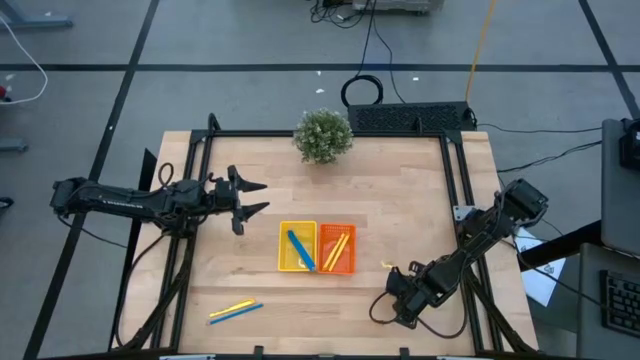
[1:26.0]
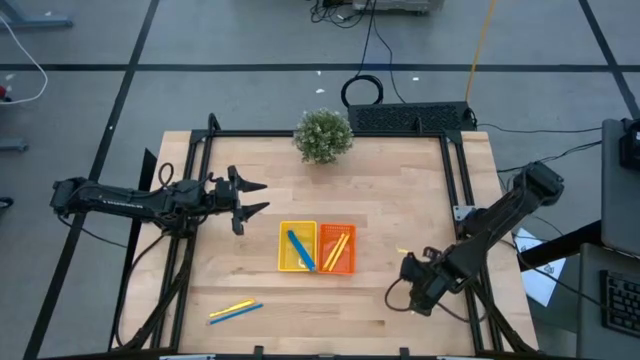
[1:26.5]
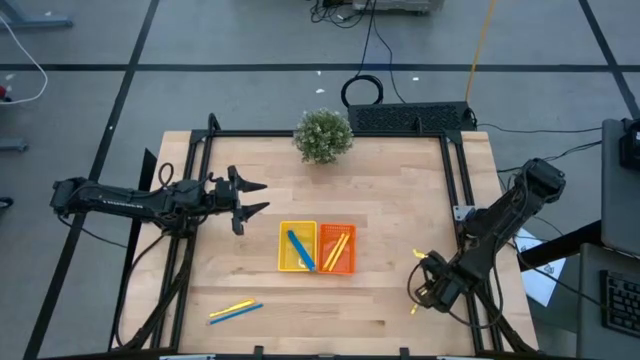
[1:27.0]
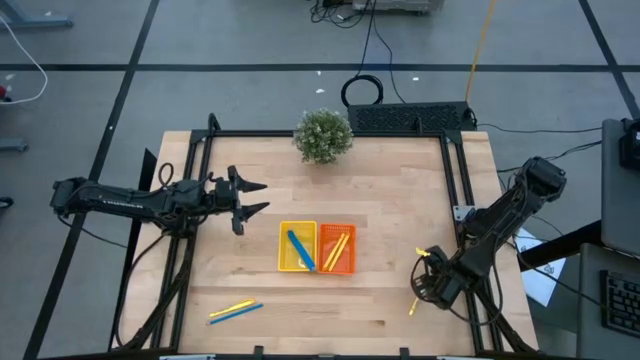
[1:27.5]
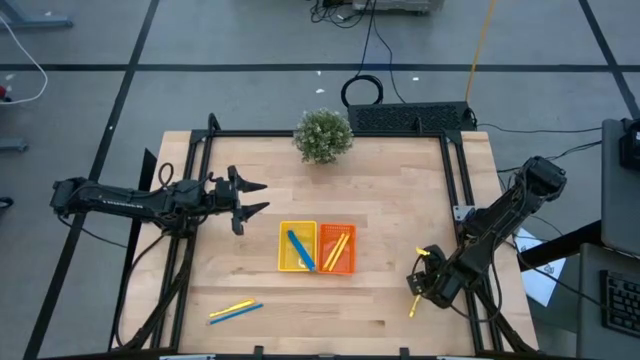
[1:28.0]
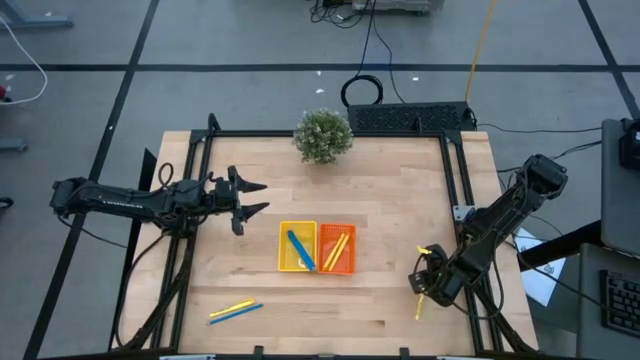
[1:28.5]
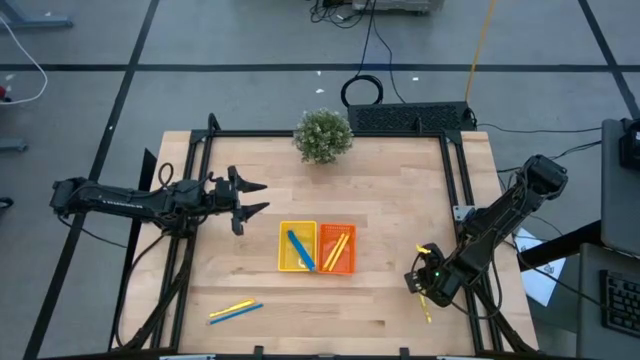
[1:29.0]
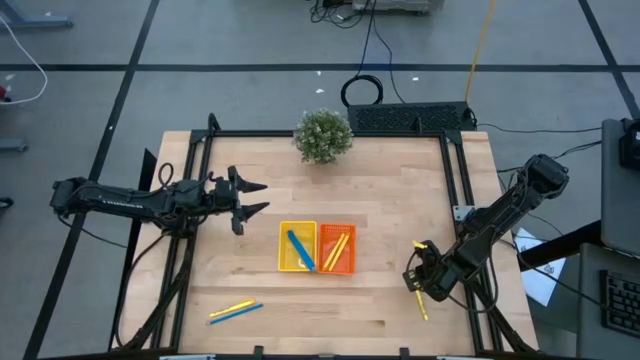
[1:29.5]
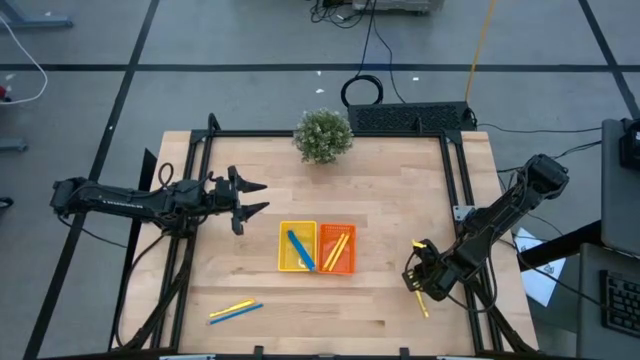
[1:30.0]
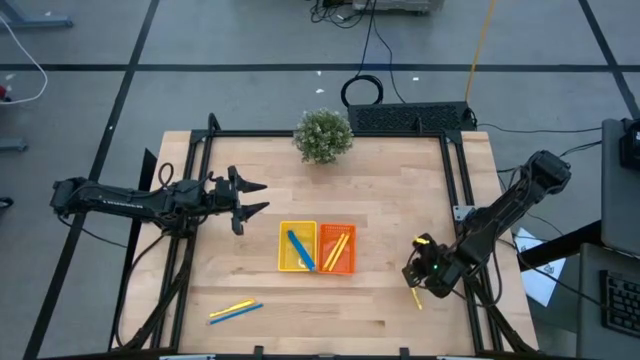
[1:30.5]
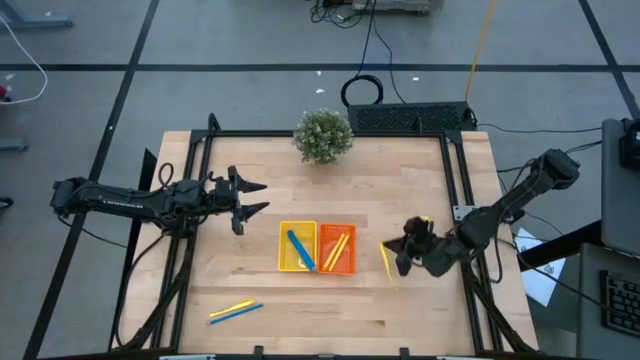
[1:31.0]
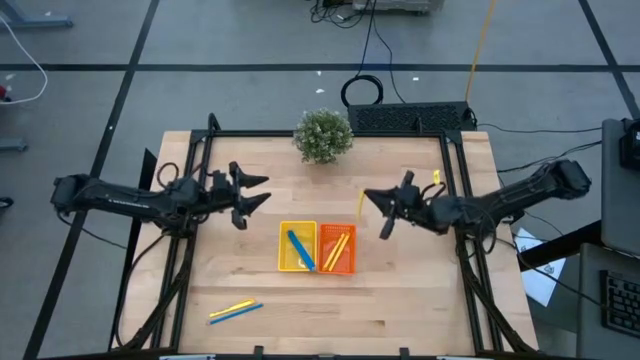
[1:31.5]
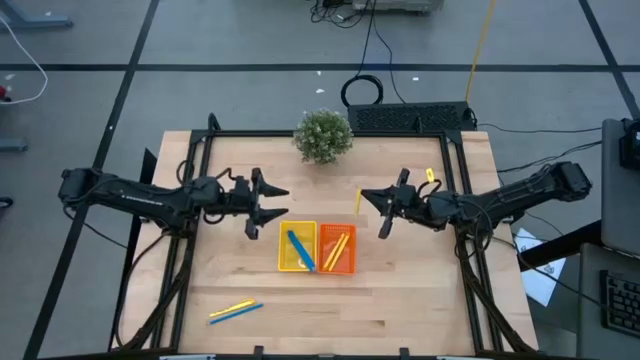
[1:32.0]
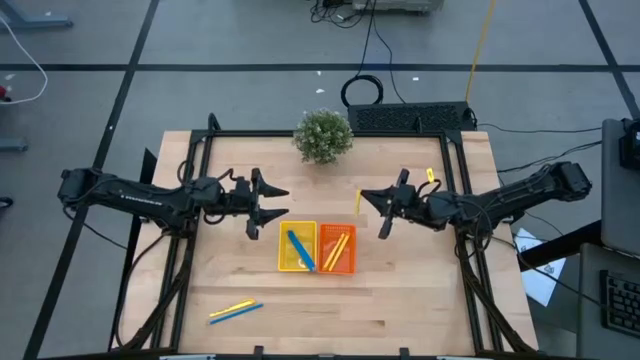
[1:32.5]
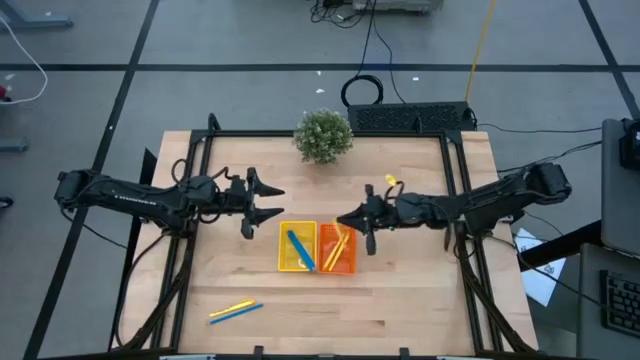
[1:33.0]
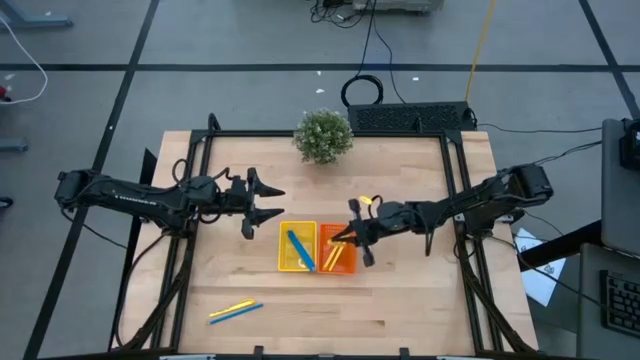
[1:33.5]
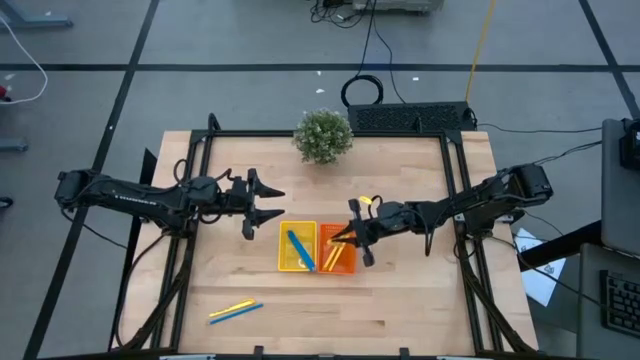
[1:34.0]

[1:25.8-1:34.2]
Task: Sort pens & pencils
Put the right yellow pen into the orange bin

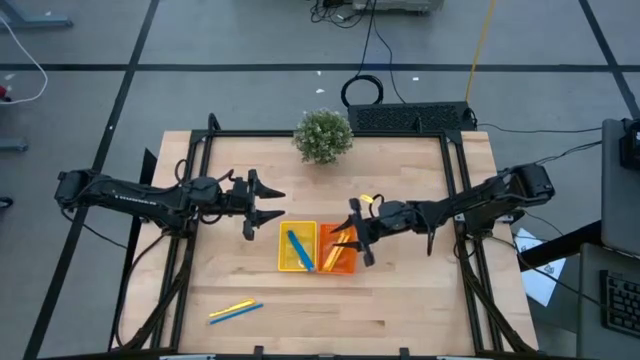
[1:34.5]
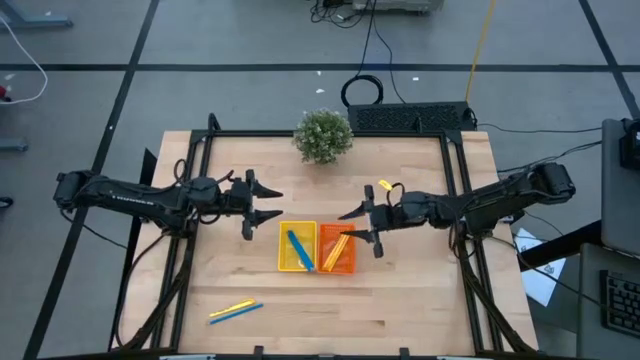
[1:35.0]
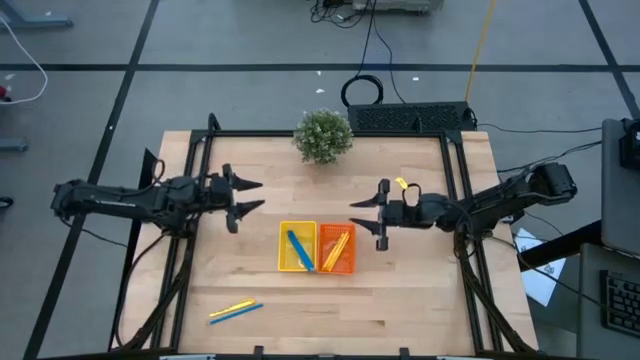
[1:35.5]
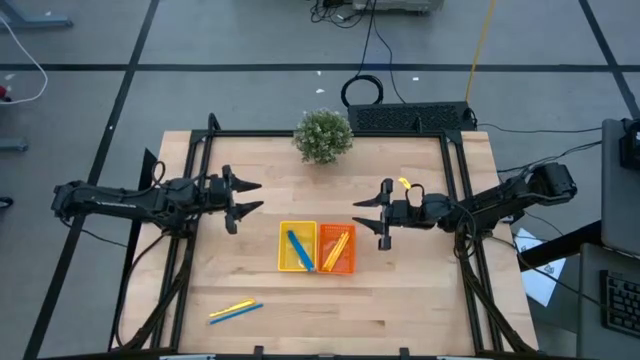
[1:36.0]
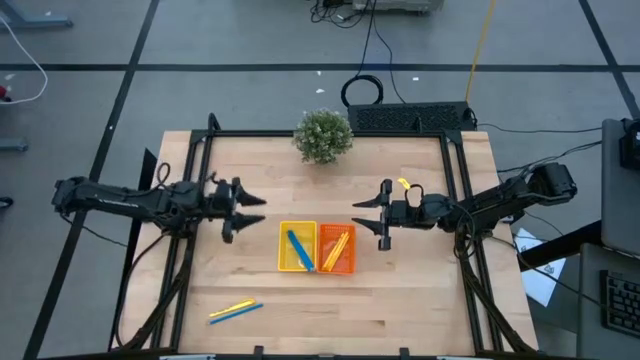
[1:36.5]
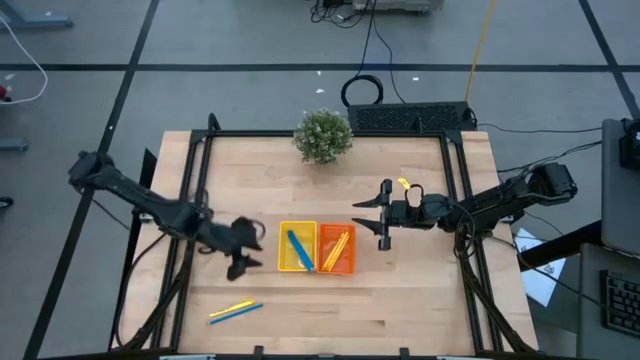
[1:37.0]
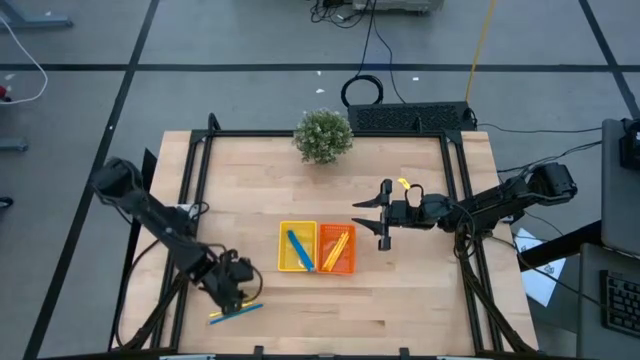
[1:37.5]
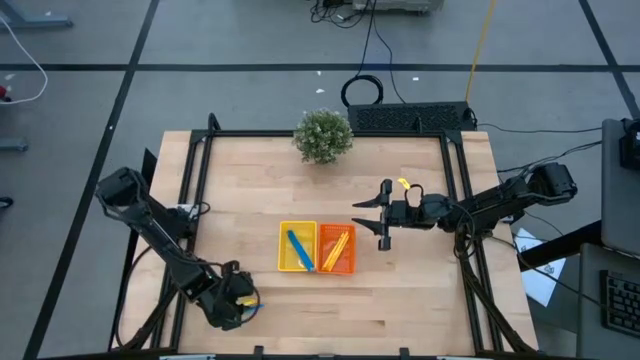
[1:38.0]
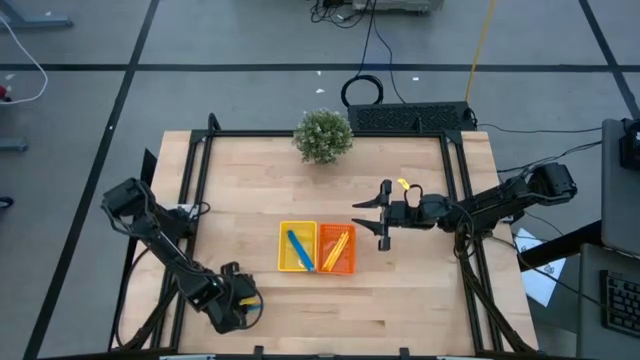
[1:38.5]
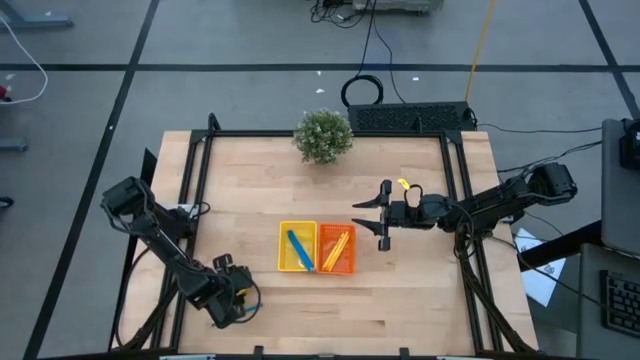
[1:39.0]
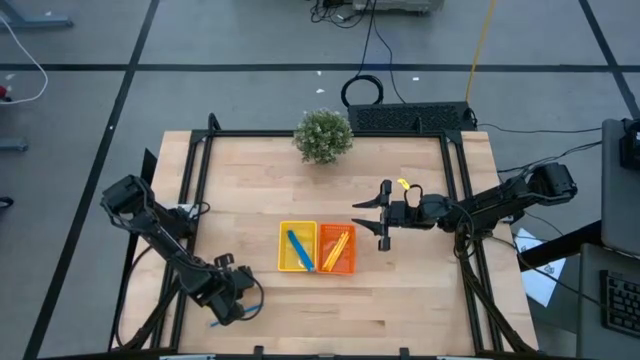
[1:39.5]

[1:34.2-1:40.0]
Put the yellow pen into the orange bin

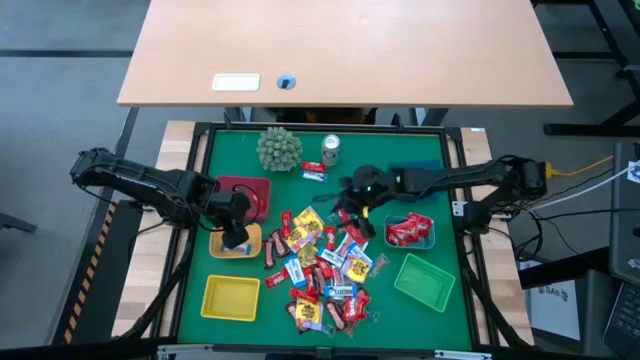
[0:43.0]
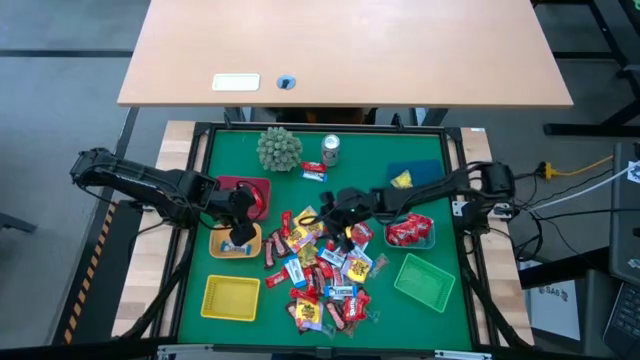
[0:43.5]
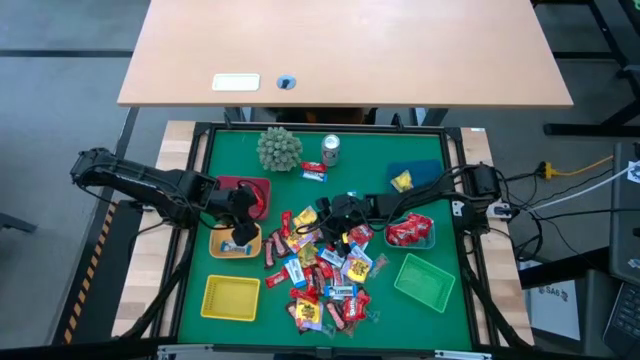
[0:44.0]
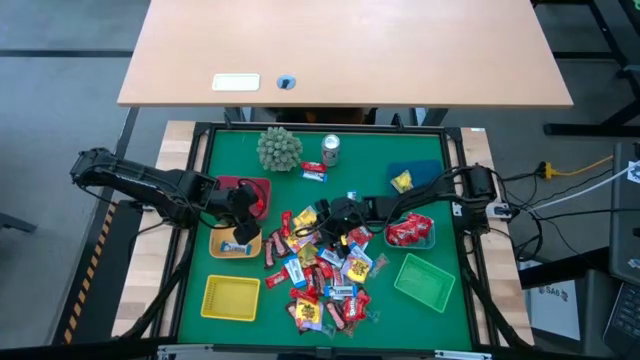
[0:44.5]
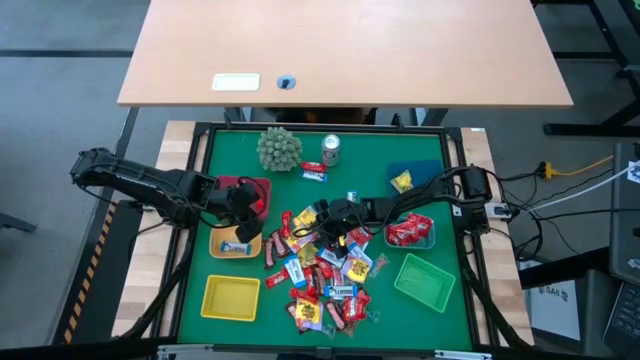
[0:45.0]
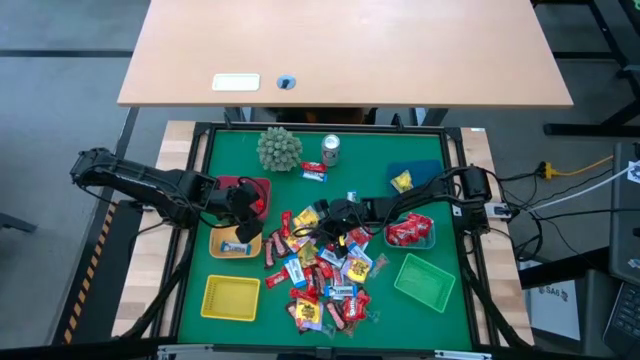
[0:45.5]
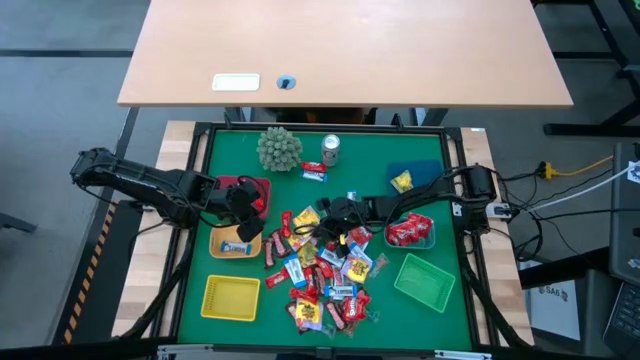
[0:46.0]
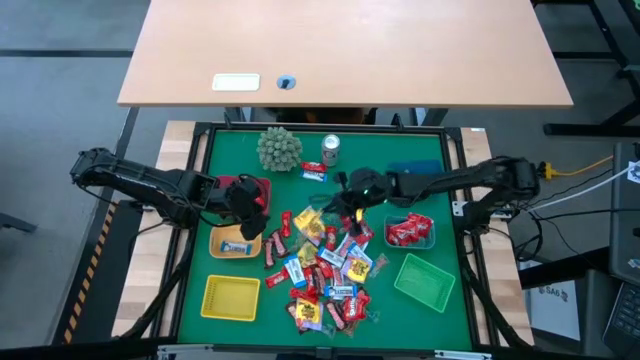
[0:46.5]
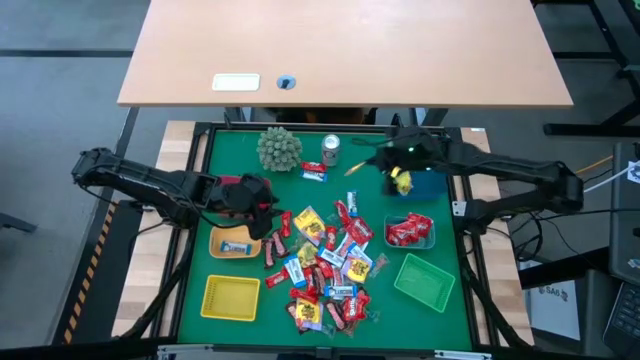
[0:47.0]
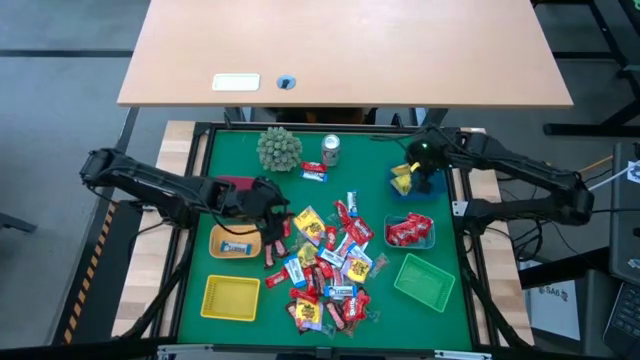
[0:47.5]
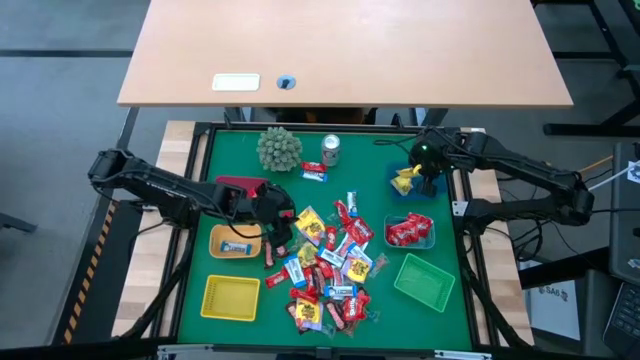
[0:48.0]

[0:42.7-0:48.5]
Task: Sort candy
Put the yellow candy into the dark blue bin
